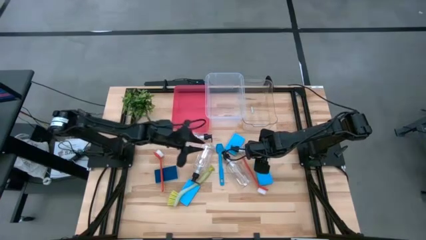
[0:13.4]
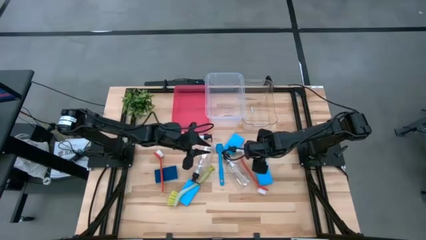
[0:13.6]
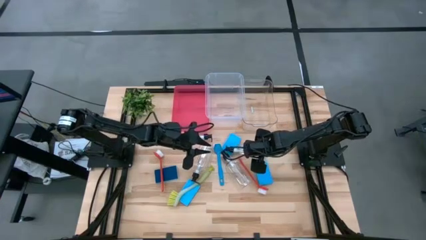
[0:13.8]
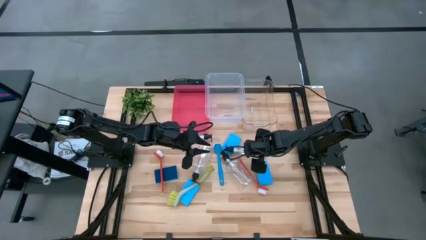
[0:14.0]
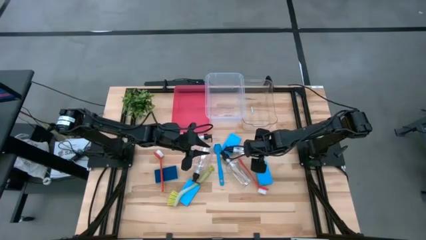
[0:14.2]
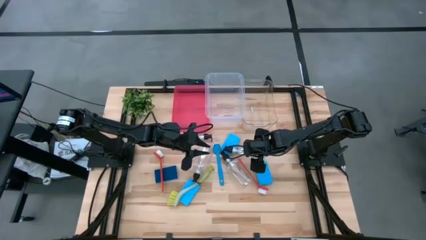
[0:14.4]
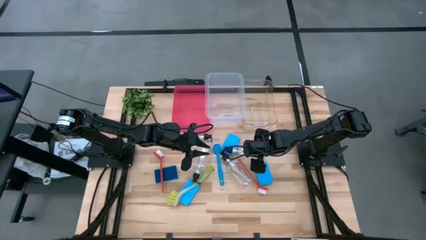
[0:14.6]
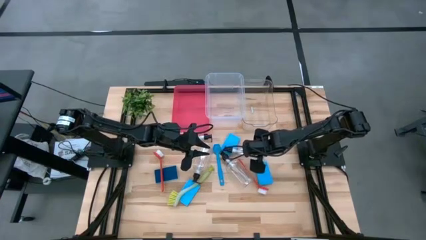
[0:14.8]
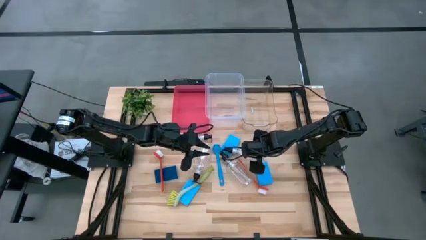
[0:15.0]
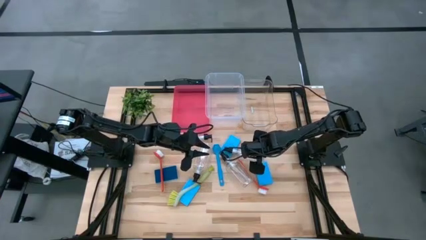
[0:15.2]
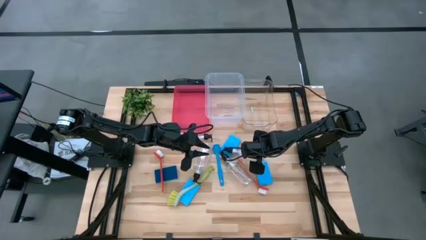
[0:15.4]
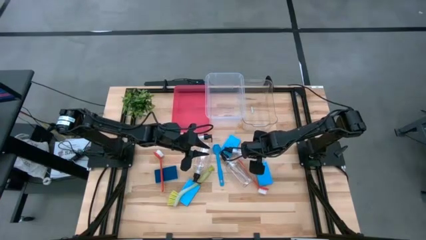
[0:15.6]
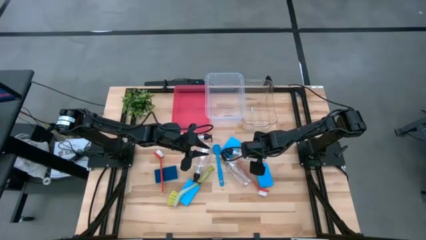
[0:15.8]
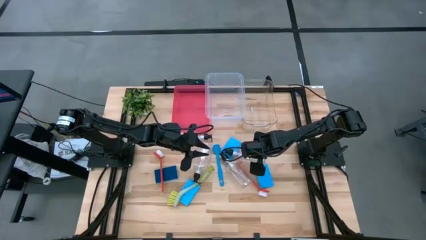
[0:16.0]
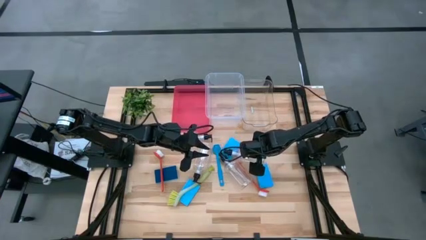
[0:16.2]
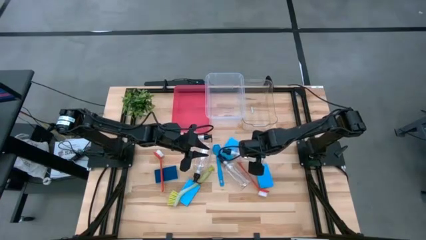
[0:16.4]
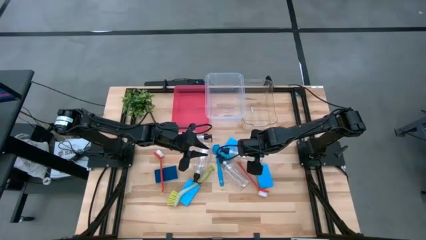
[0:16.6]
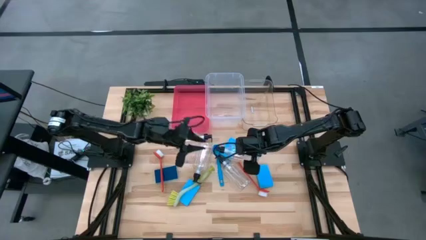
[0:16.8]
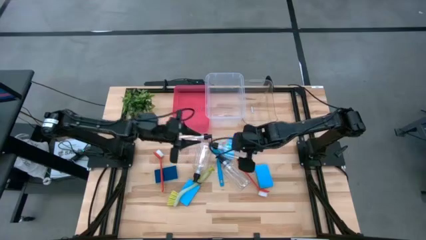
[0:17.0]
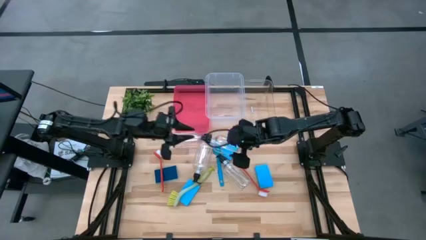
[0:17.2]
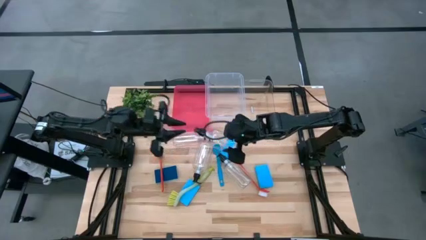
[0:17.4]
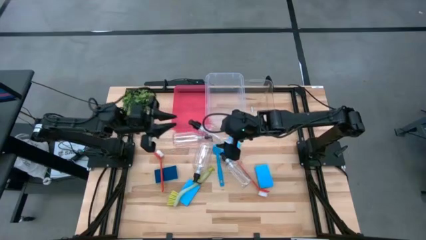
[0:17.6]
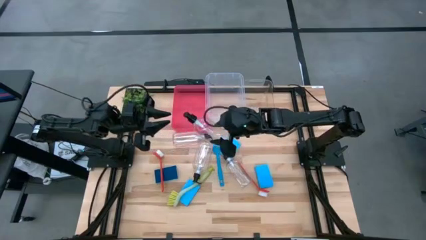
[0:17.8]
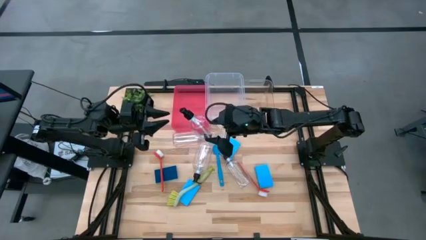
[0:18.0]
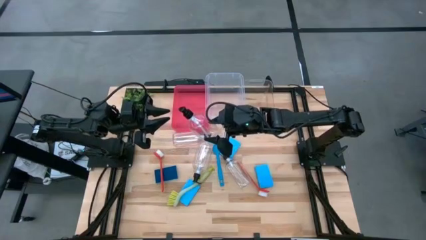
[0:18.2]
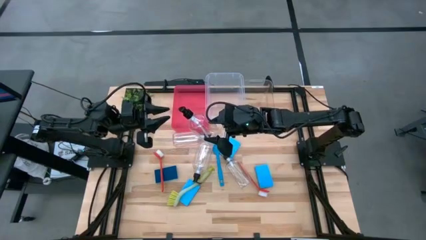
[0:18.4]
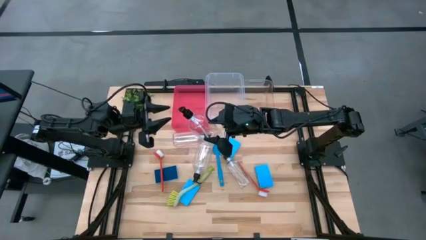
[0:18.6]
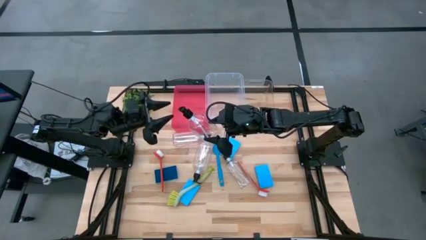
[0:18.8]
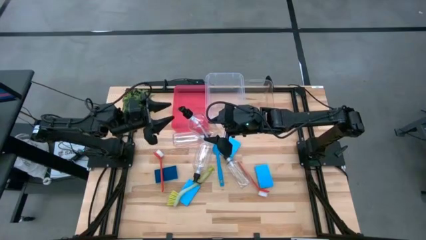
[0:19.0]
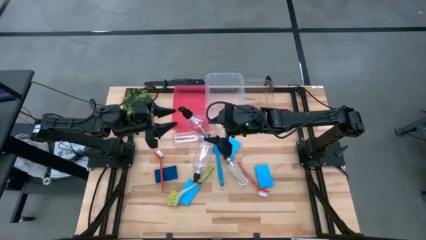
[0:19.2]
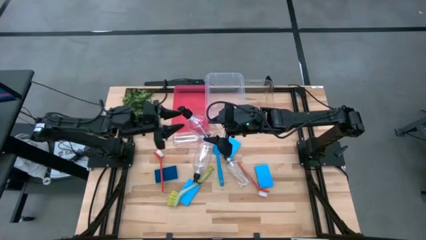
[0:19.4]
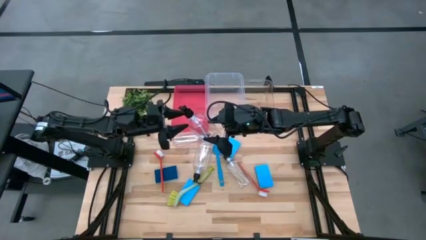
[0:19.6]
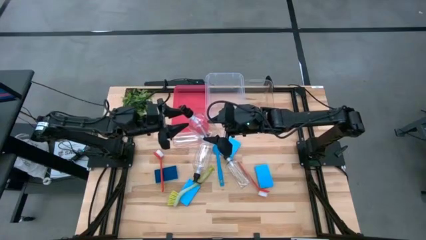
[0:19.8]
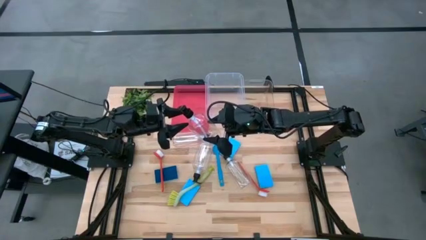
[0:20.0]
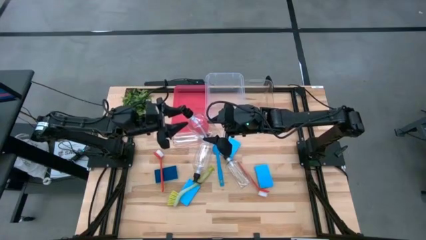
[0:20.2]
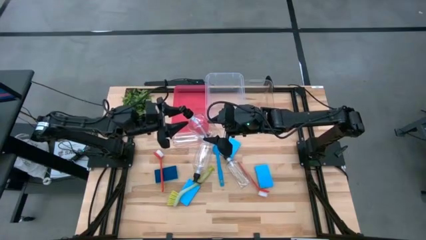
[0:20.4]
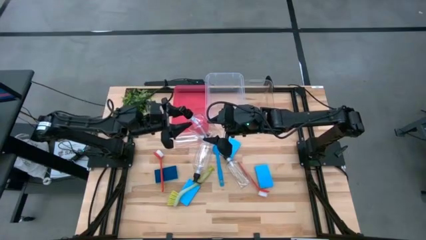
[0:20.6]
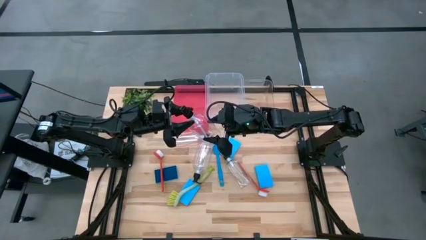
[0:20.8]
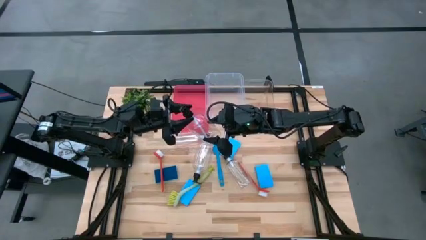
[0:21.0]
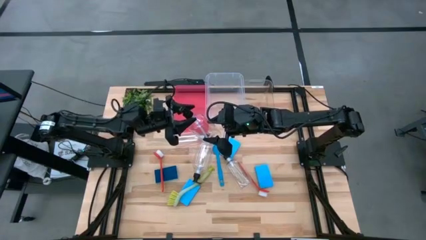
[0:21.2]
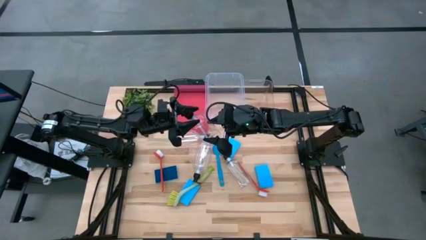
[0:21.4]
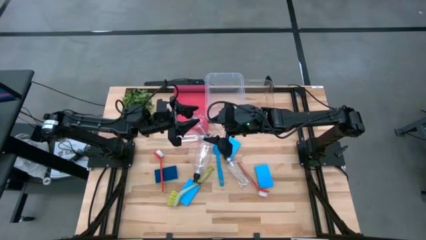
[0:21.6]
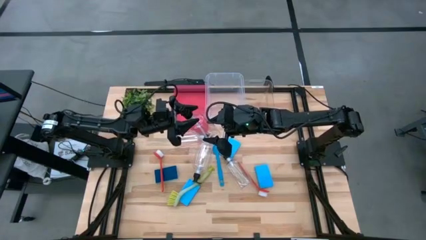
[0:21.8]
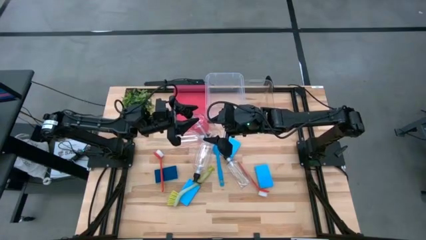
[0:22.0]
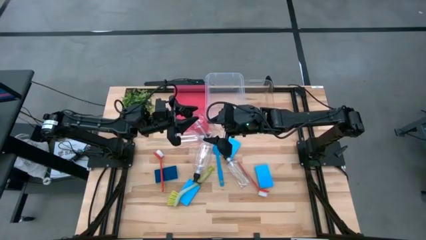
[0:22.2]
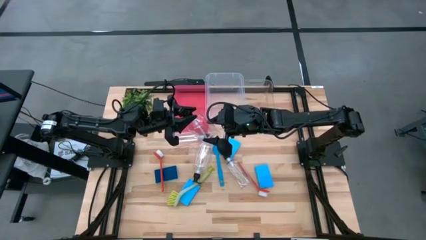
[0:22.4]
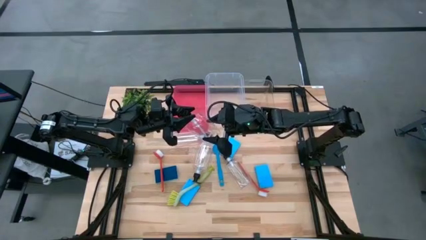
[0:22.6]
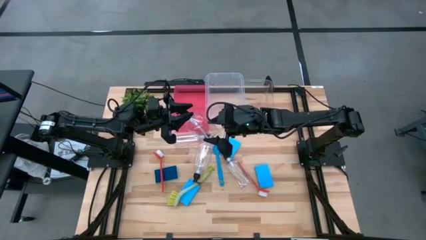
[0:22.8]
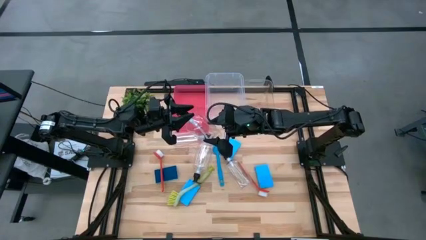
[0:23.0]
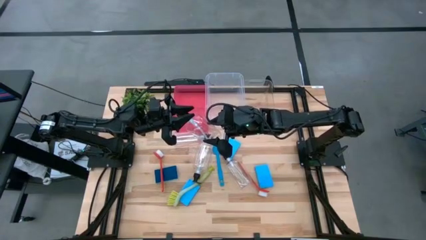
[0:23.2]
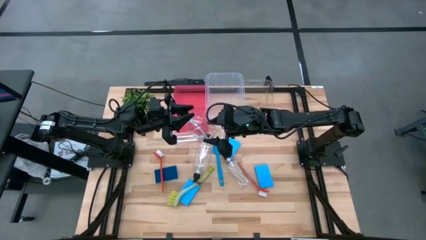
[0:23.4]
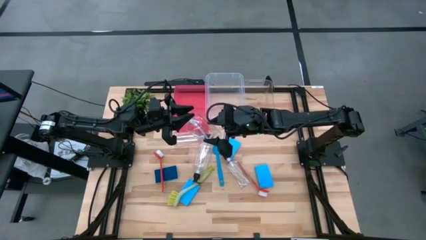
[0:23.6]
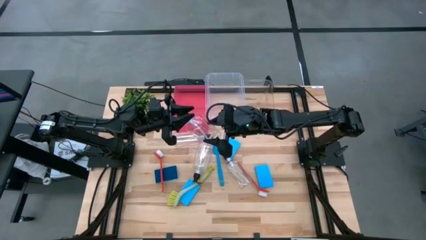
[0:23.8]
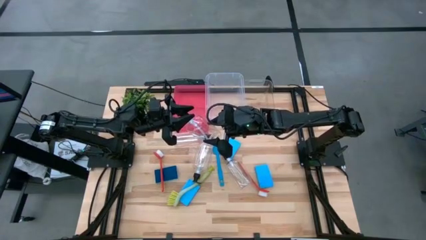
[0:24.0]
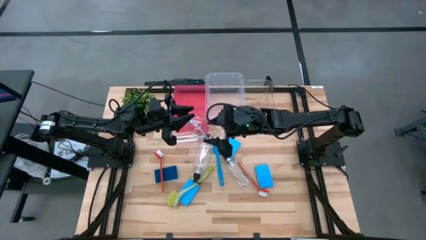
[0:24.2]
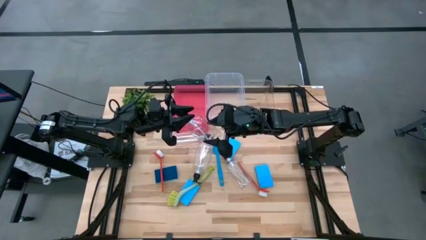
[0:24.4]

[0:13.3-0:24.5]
Task: Pick & Place Kitchen Sink Supplies
Put the top right transparent dishwashing liquid dispenser into the red bin

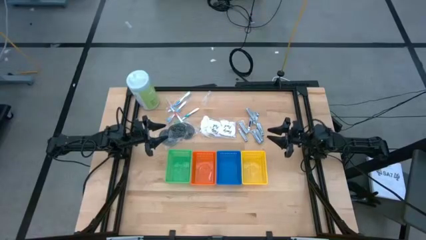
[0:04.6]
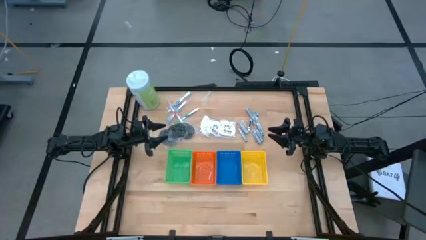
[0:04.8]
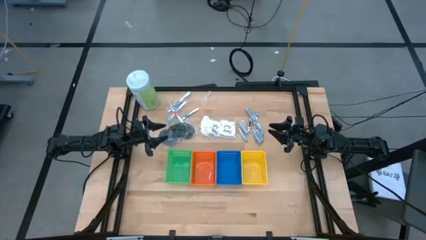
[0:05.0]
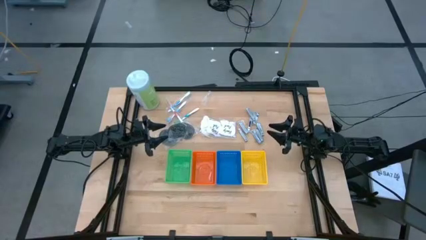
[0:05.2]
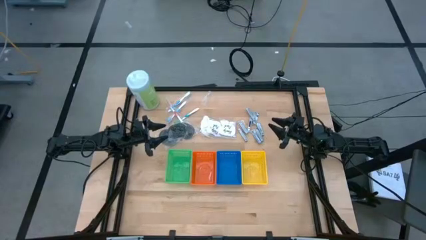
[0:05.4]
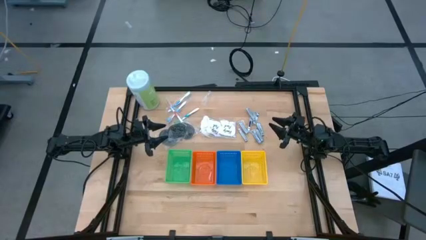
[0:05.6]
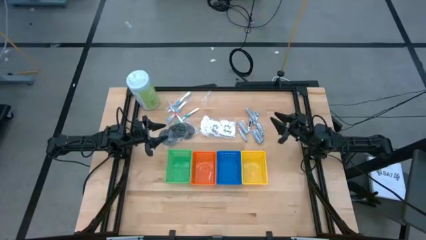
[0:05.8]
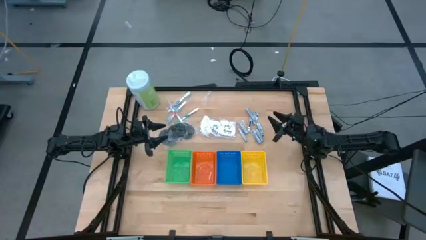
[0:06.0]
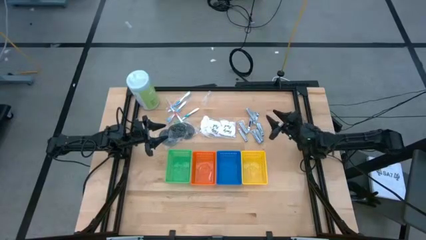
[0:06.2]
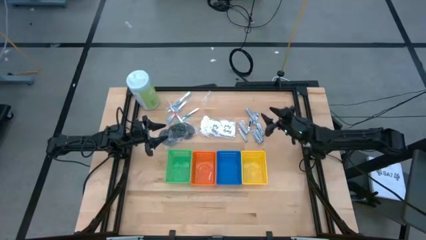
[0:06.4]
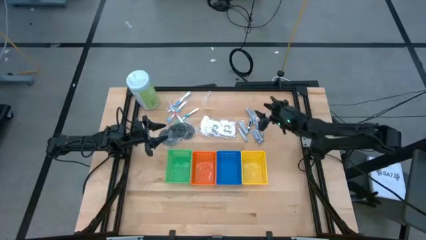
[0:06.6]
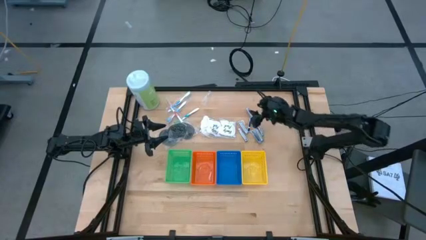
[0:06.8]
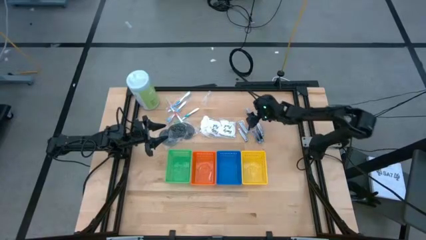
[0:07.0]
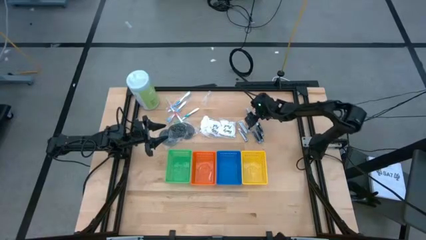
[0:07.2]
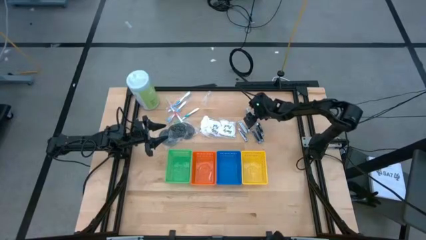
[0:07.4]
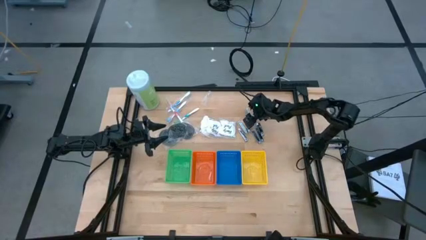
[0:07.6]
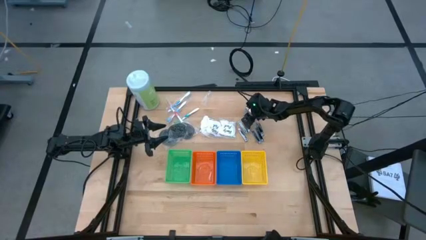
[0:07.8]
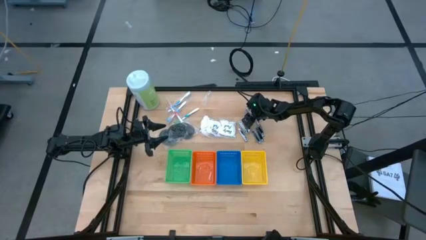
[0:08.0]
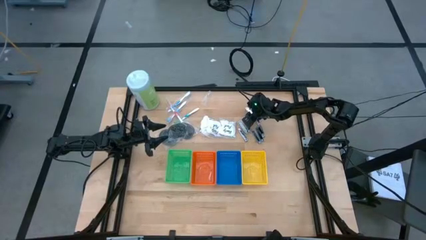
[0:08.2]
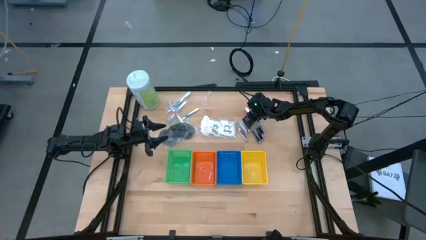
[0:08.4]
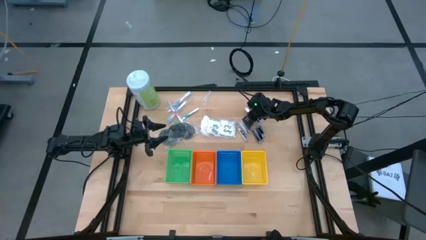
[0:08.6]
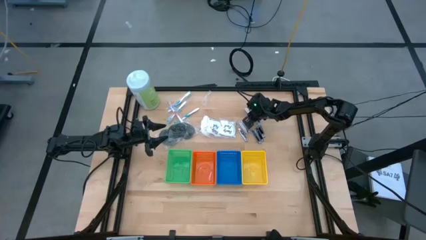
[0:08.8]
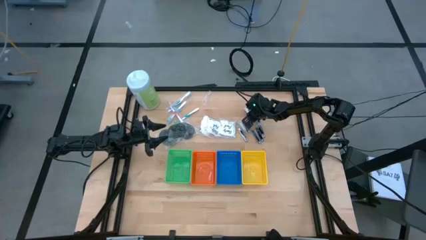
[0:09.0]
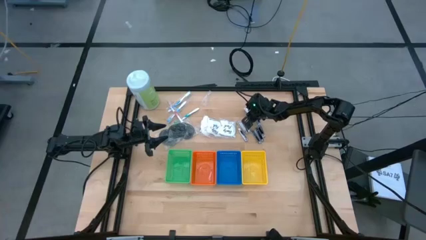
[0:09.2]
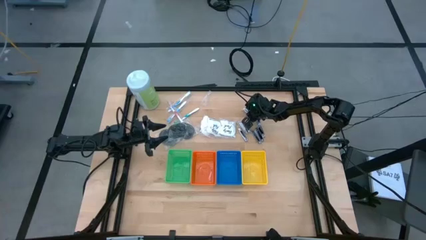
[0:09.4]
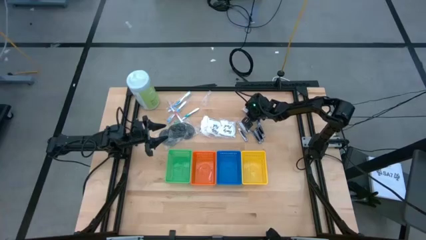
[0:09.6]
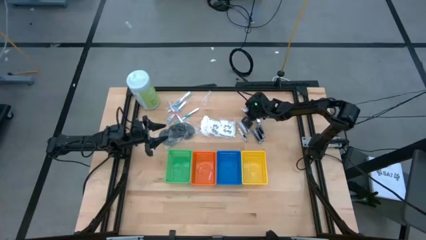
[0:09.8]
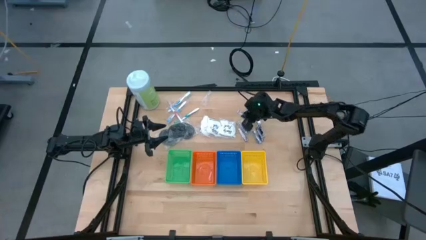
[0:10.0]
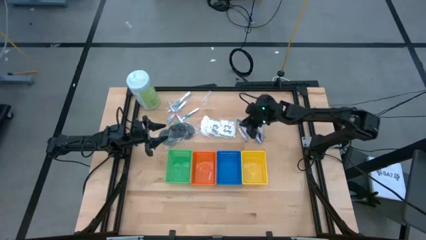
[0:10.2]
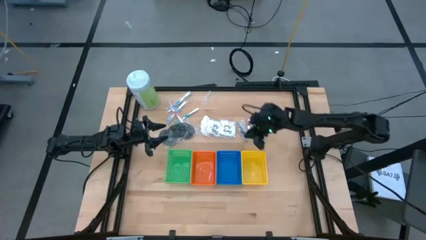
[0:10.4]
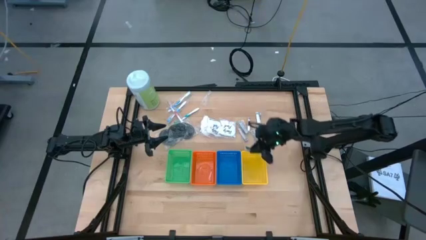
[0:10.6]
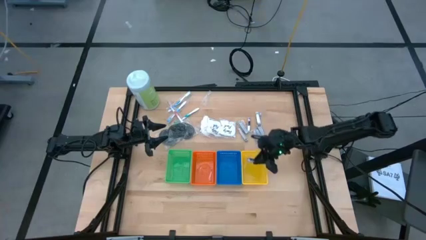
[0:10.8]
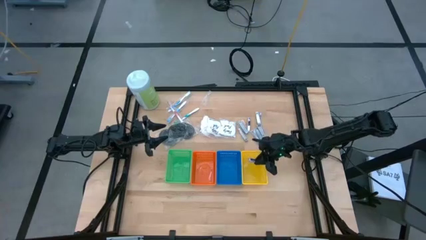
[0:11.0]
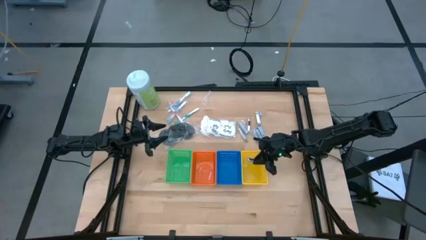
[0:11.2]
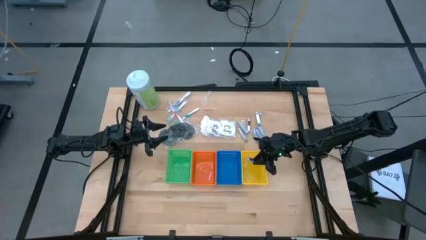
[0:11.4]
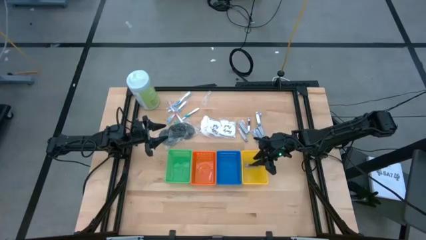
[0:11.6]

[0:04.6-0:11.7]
Task: Pick & Place Travel size toiletries
Put the silver nail cutter into the yellow basket
